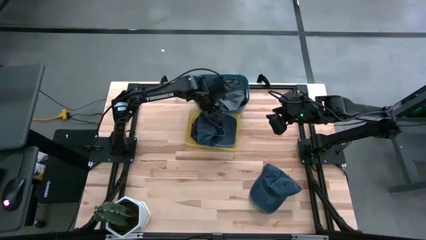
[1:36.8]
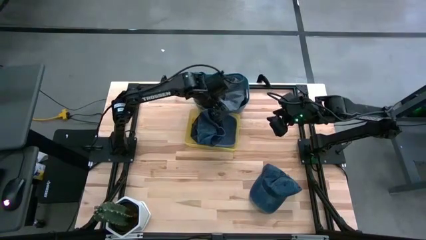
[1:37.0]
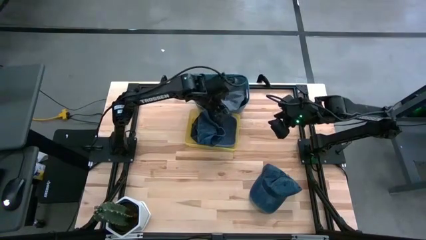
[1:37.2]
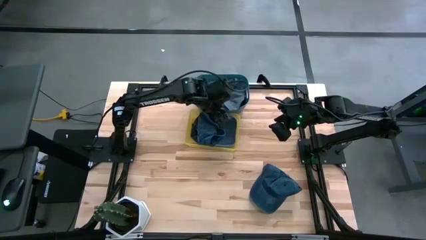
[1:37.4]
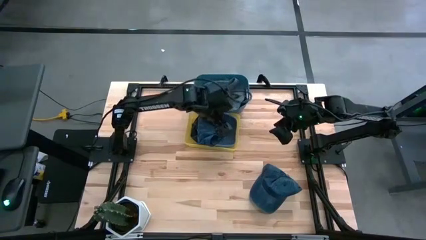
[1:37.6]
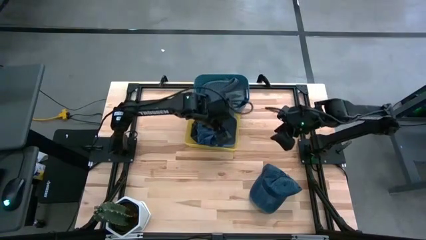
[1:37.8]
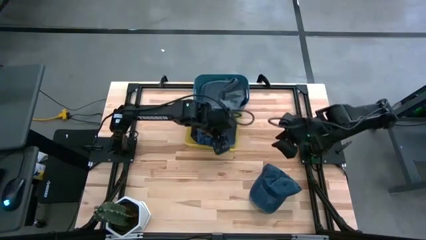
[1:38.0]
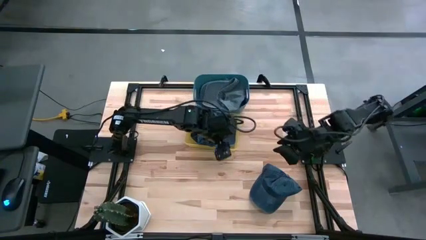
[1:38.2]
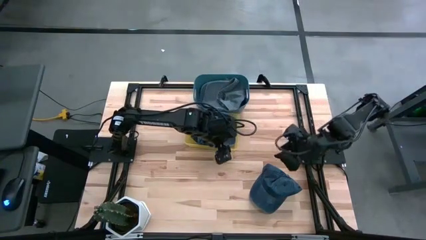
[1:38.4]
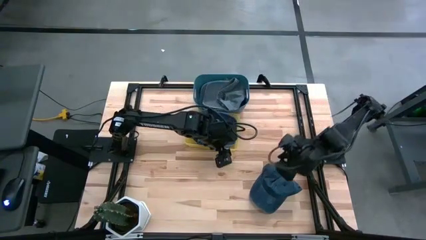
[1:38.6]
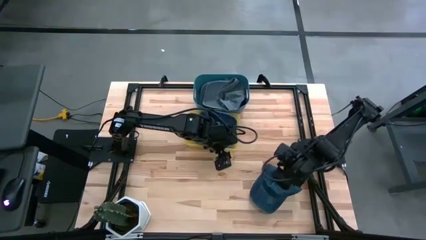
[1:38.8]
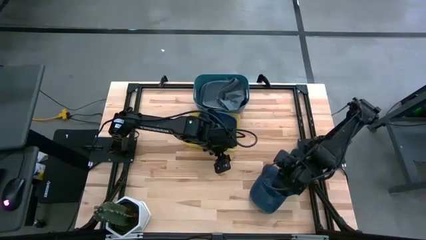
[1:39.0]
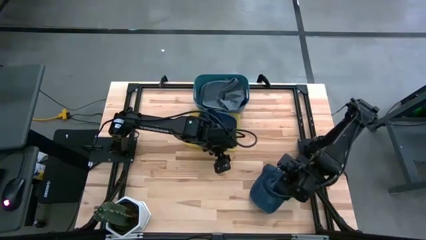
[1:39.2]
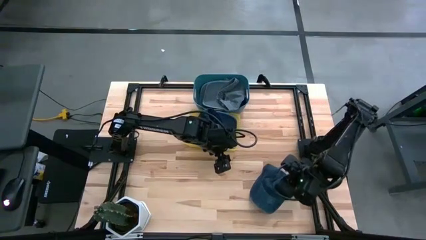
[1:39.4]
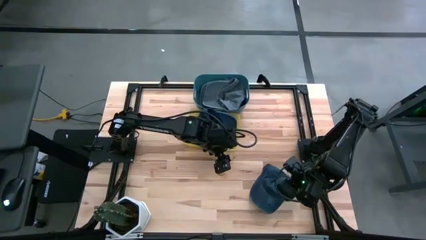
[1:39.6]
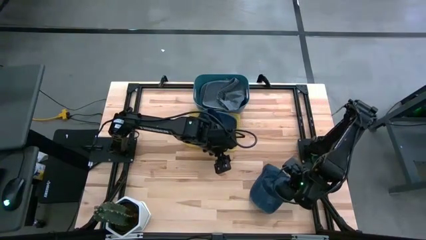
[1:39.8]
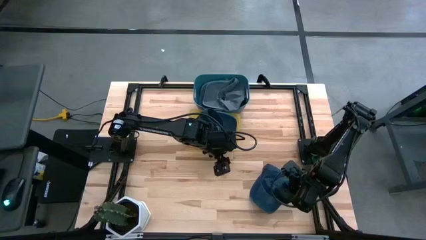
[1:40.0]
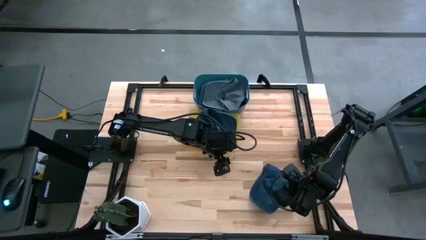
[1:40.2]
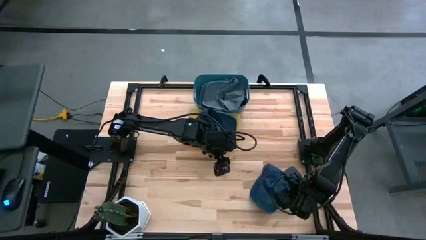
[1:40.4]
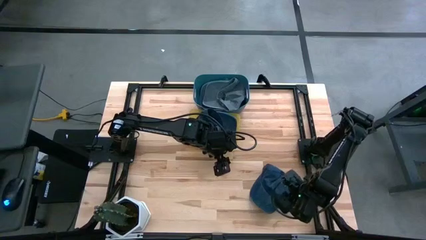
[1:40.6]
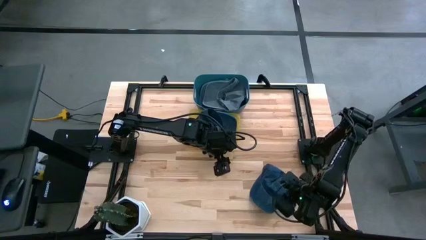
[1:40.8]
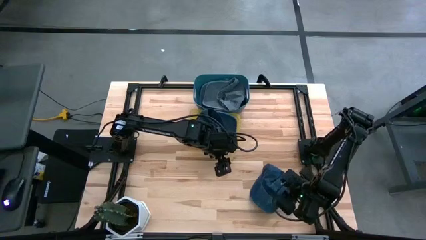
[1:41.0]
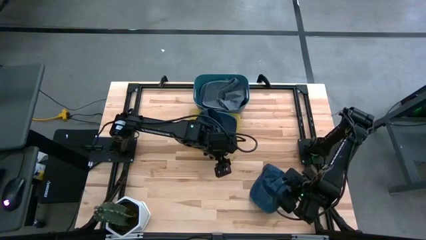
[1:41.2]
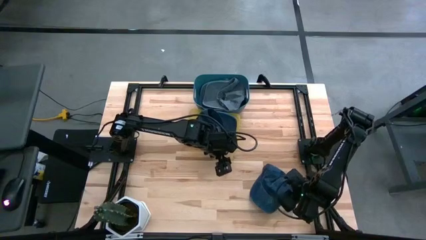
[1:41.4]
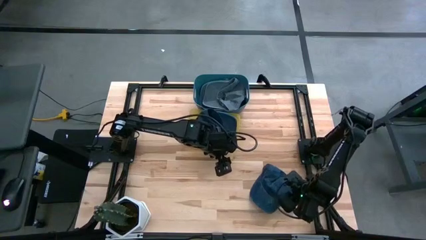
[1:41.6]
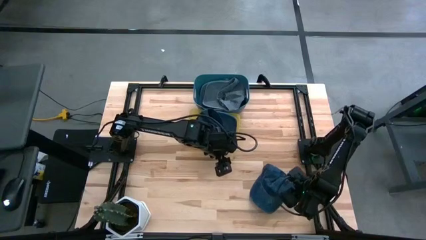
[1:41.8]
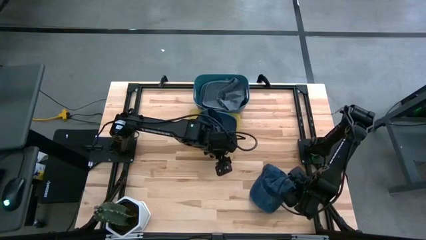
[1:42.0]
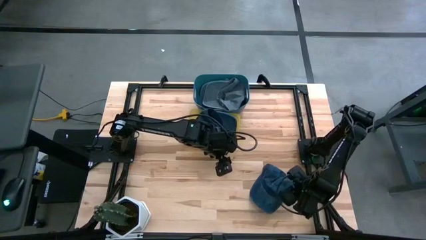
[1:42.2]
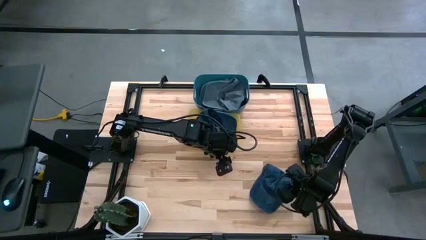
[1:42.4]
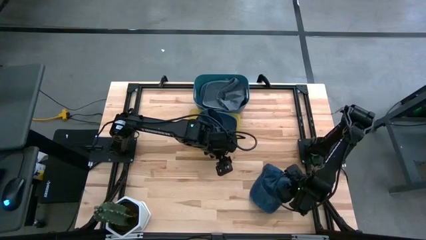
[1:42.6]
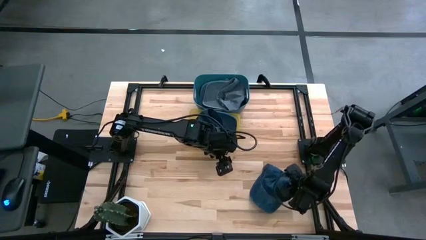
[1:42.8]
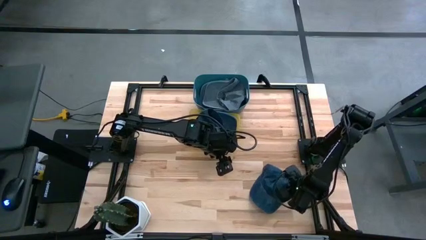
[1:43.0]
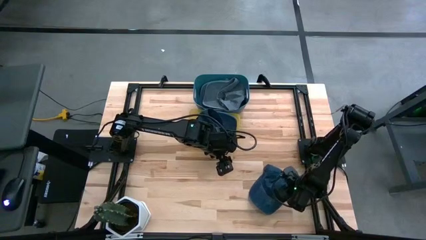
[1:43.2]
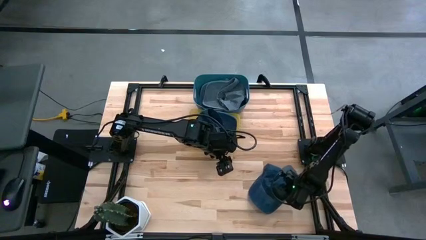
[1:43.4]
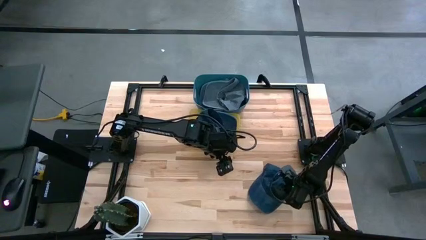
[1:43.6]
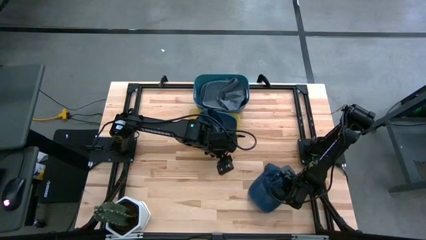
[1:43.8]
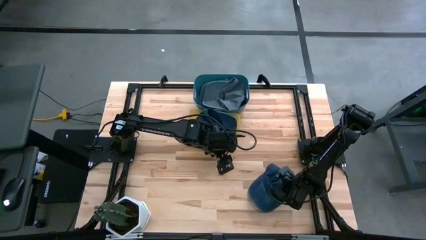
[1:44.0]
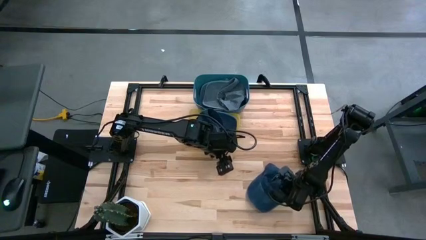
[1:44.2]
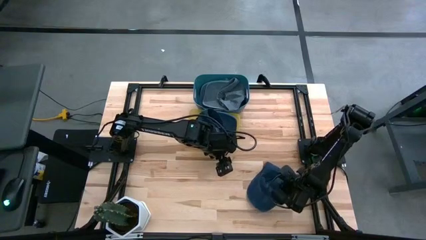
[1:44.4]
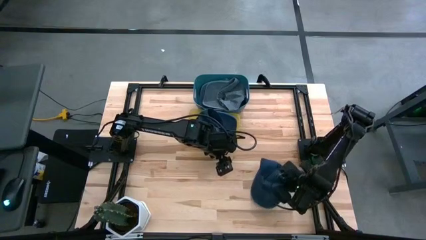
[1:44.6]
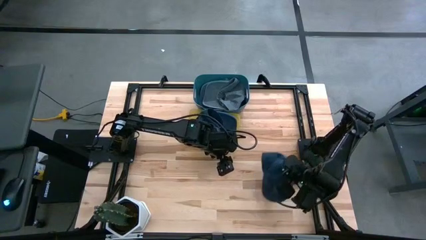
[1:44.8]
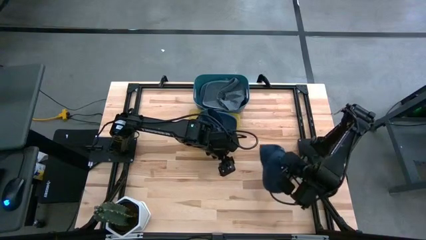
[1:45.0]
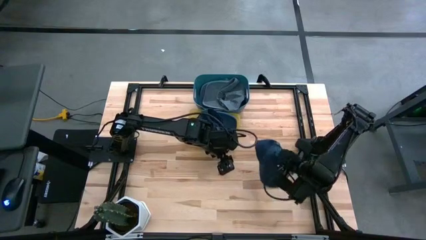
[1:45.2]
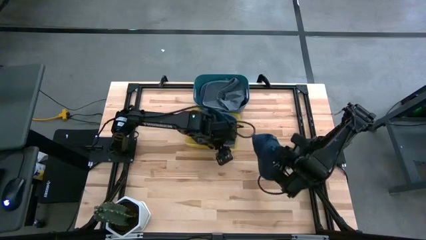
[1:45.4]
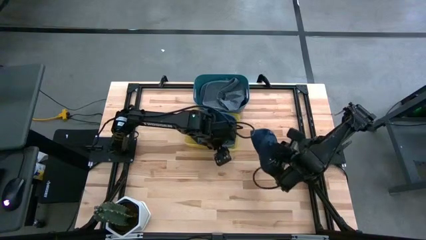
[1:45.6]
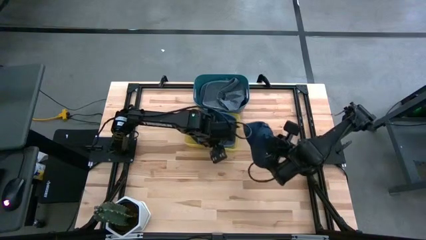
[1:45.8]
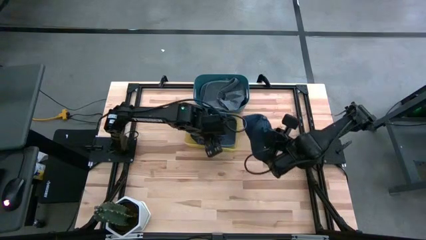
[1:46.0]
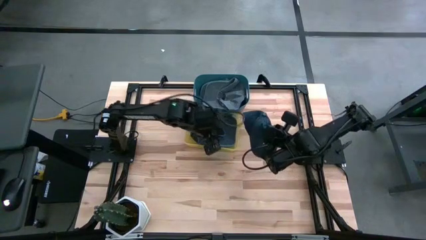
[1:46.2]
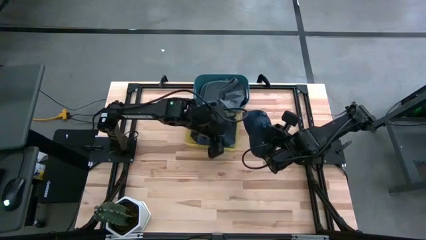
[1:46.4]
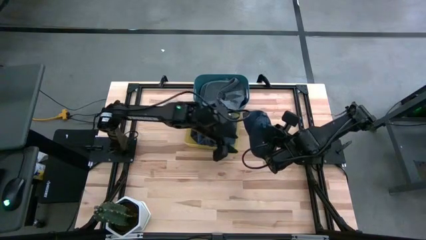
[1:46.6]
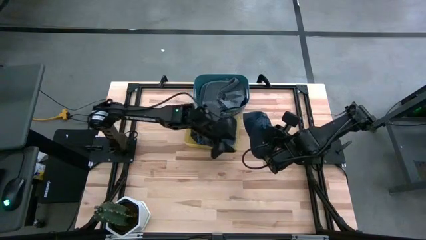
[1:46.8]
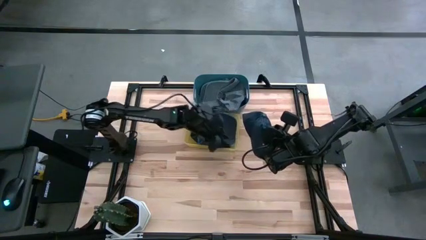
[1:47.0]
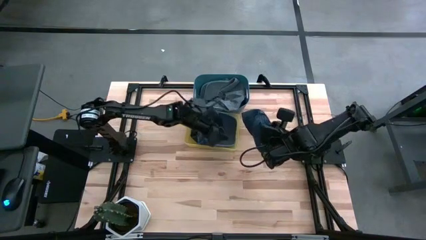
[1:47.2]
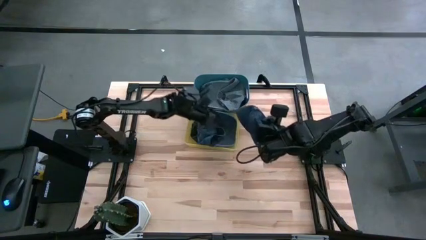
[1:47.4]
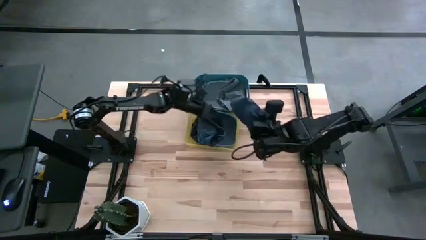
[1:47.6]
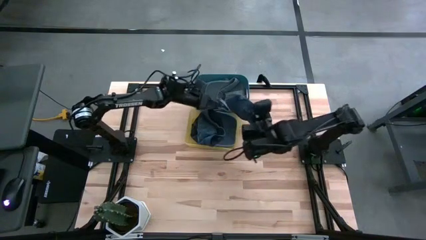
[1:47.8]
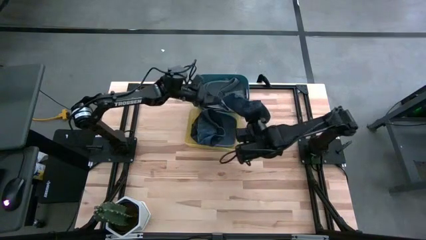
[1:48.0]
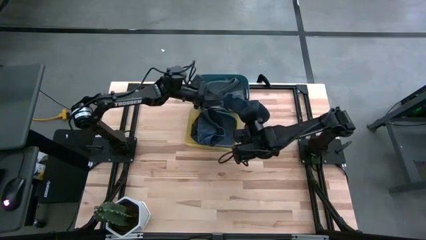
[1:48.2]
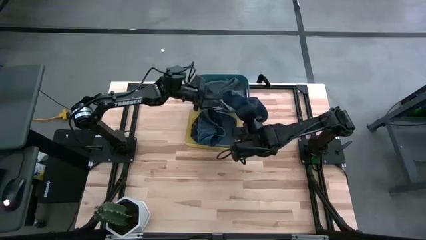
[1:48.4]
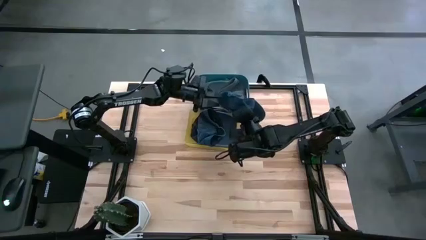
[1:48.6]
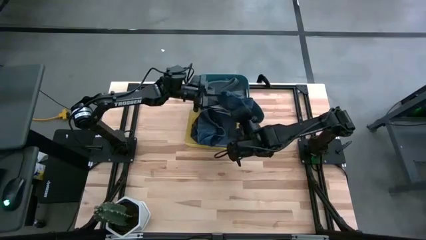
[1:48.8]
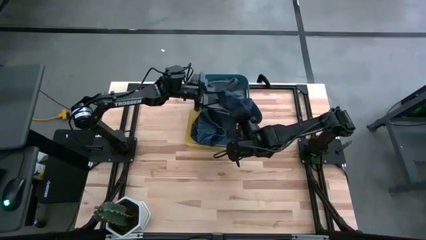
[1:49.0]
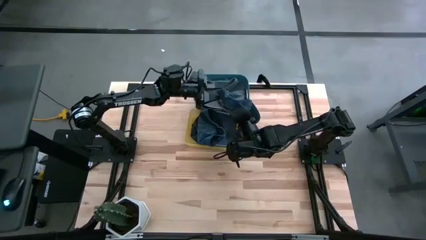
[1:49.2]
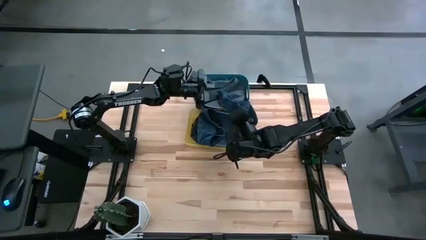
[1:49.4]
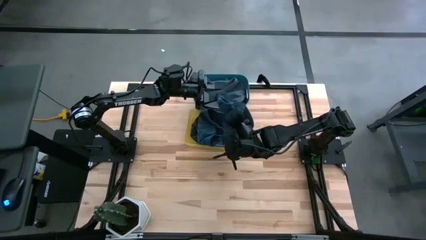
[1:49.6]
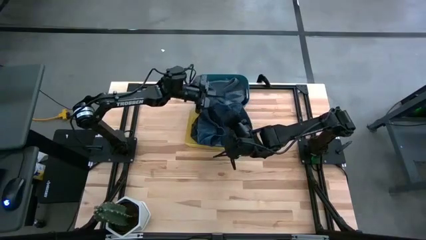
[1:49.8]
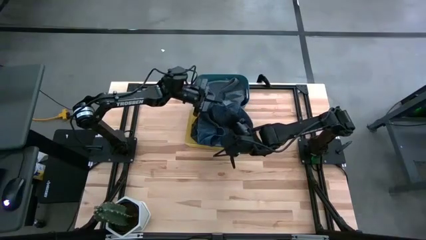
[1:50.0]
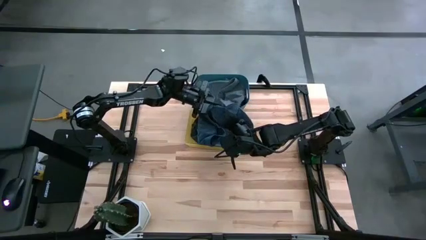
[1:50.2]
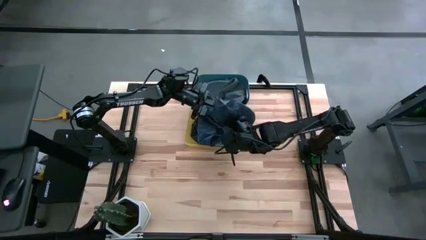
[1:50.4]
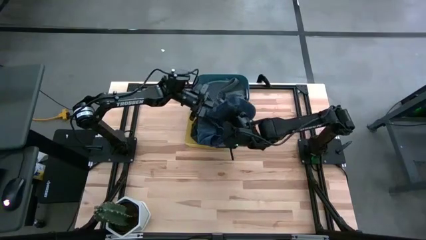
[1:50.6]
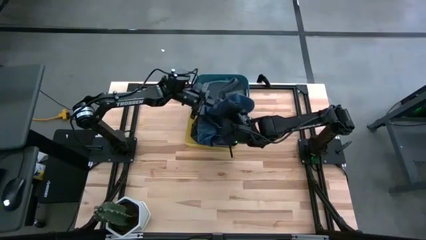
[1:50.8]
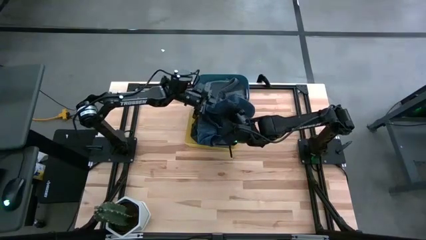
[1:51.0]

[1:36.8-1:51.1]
Task: Pick & Place hat
Put the blue cap into the yellow bin
